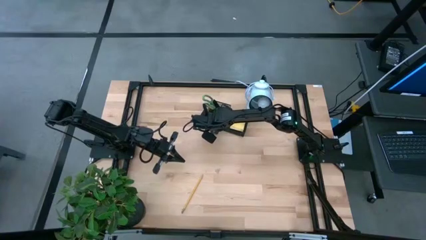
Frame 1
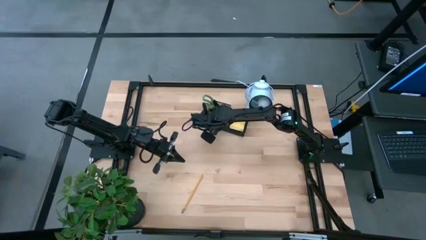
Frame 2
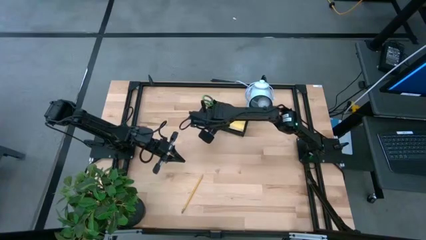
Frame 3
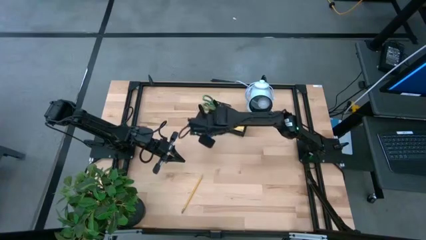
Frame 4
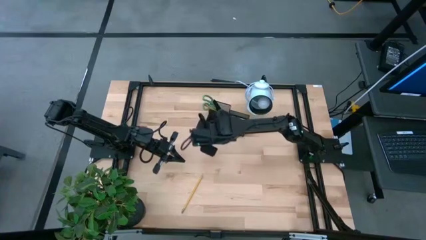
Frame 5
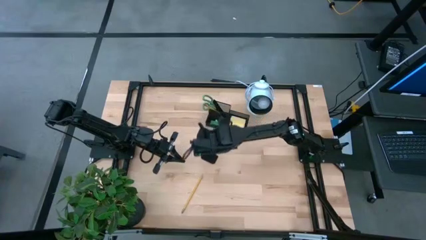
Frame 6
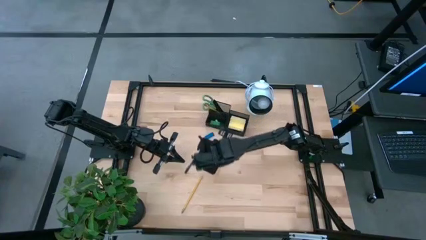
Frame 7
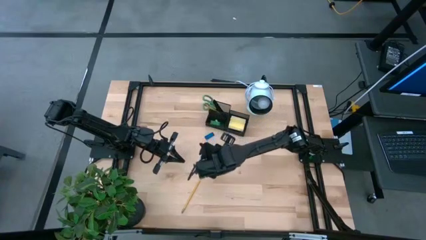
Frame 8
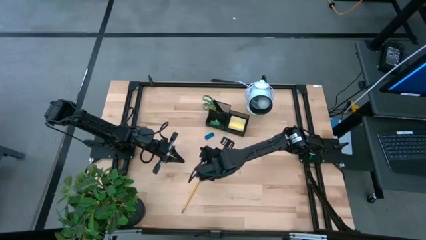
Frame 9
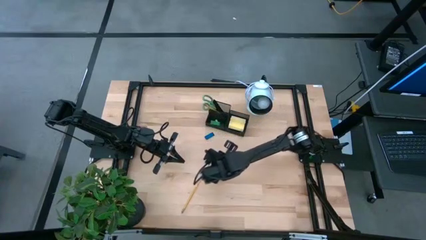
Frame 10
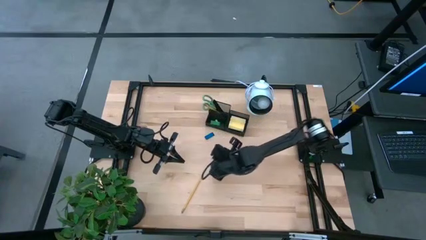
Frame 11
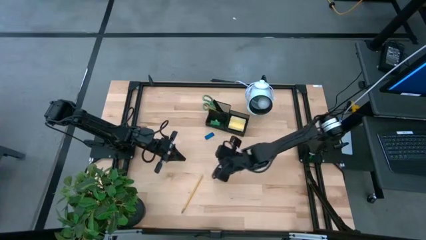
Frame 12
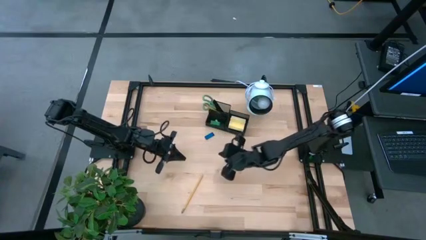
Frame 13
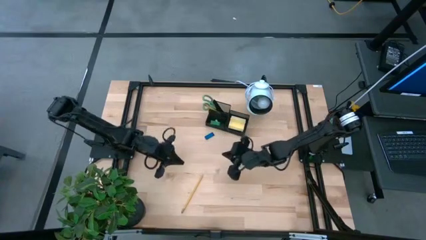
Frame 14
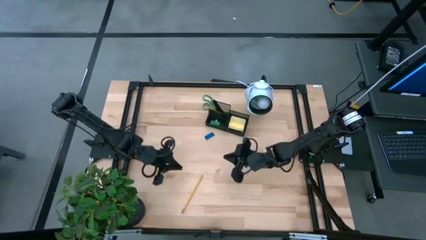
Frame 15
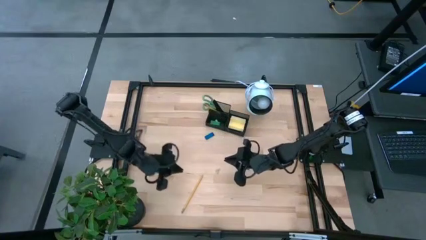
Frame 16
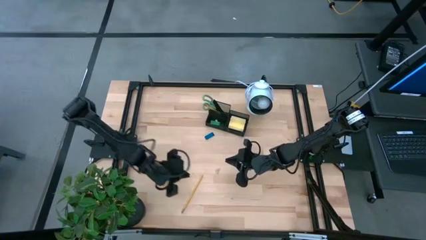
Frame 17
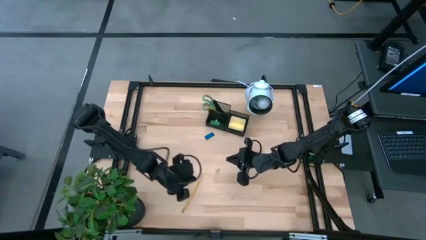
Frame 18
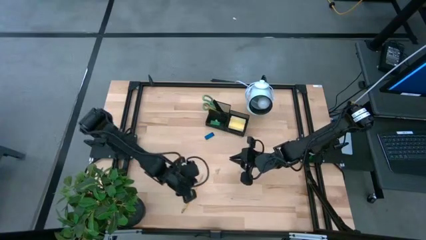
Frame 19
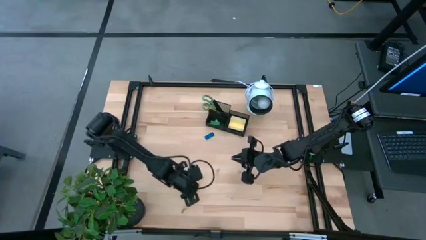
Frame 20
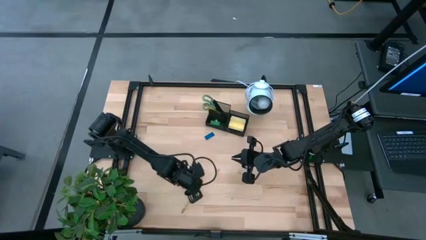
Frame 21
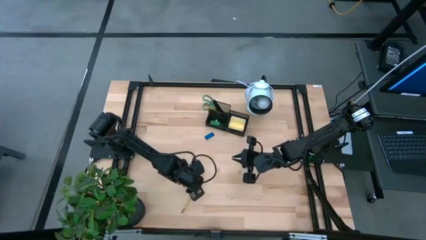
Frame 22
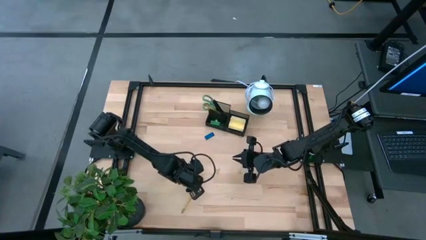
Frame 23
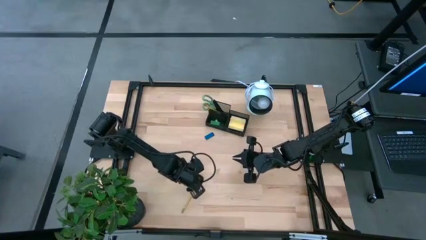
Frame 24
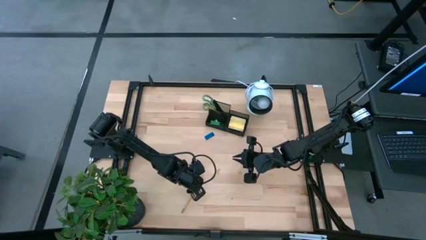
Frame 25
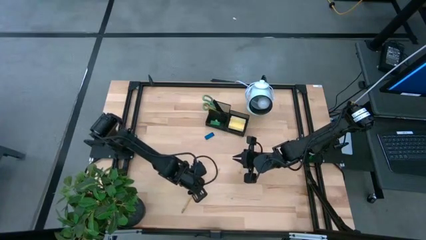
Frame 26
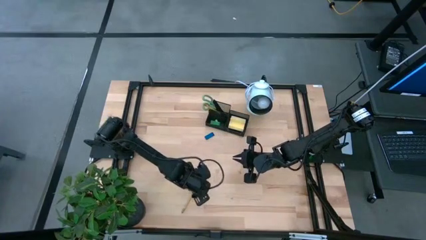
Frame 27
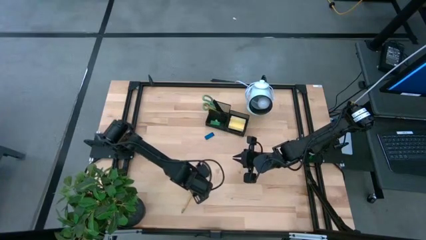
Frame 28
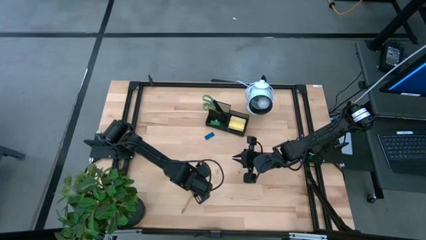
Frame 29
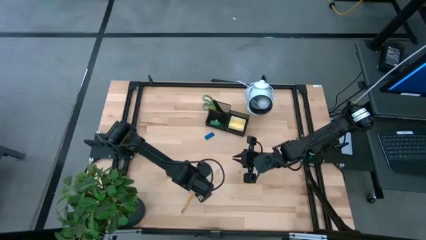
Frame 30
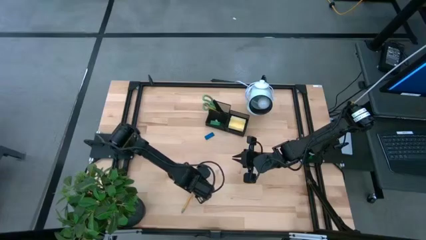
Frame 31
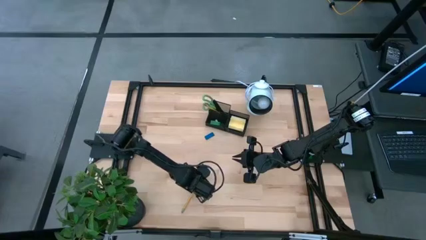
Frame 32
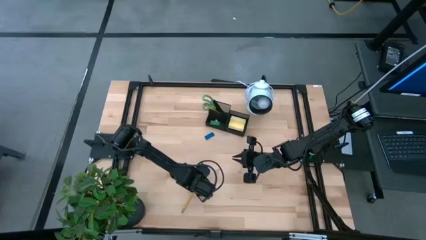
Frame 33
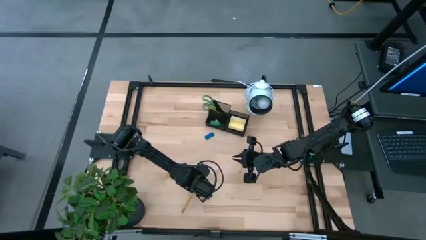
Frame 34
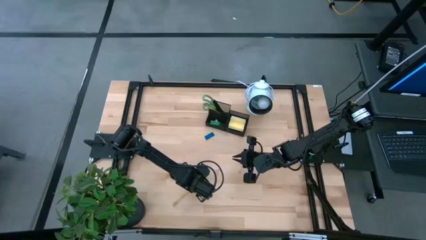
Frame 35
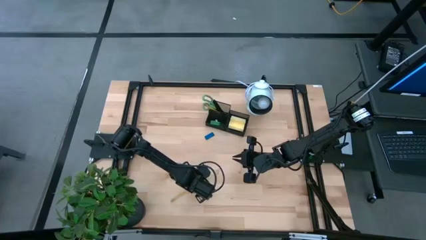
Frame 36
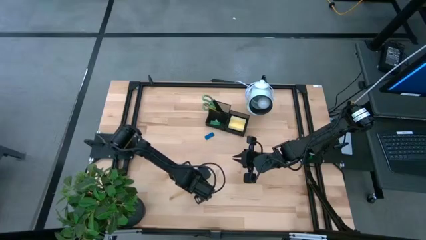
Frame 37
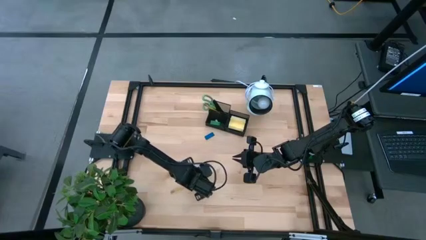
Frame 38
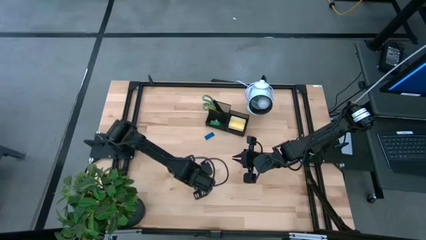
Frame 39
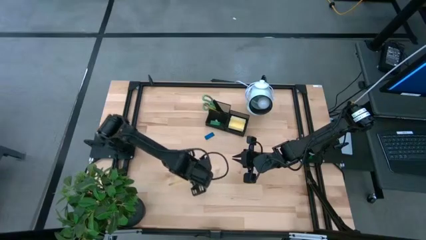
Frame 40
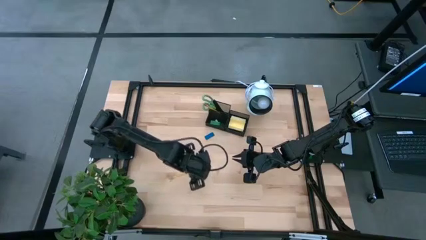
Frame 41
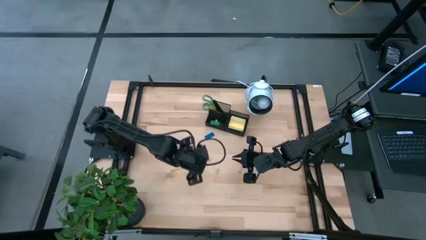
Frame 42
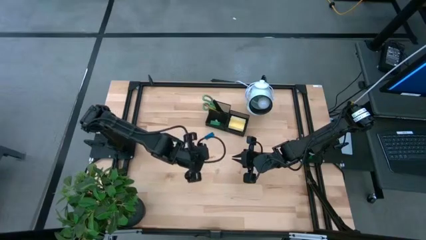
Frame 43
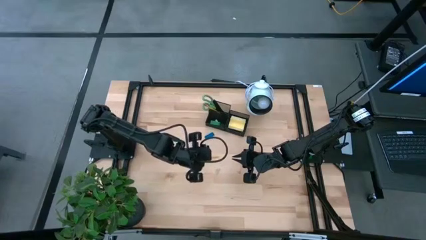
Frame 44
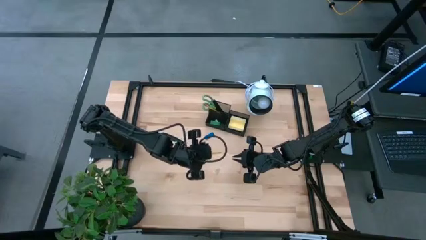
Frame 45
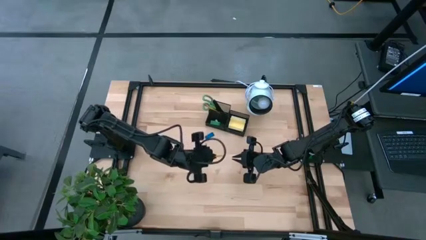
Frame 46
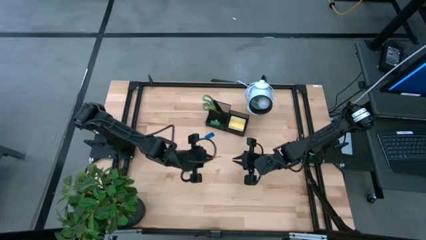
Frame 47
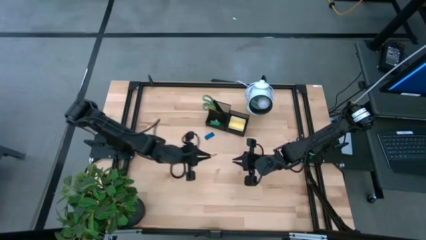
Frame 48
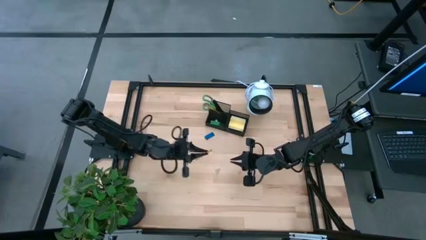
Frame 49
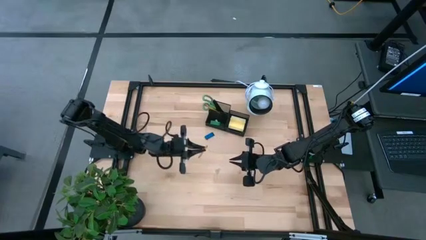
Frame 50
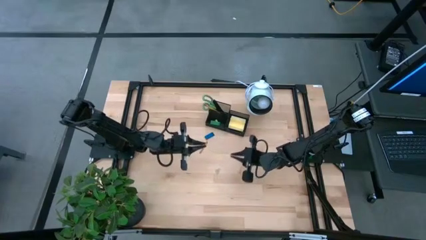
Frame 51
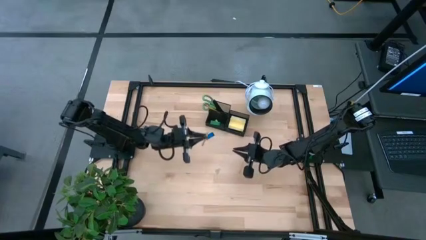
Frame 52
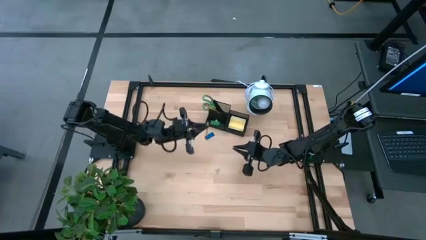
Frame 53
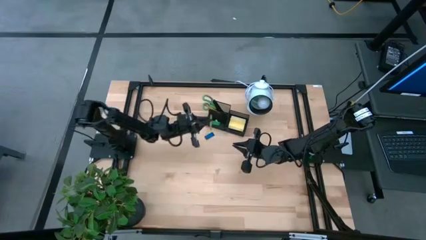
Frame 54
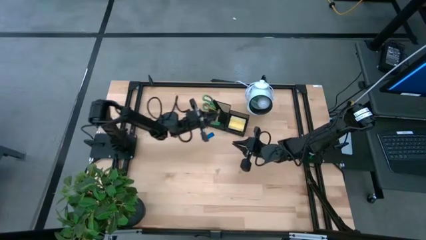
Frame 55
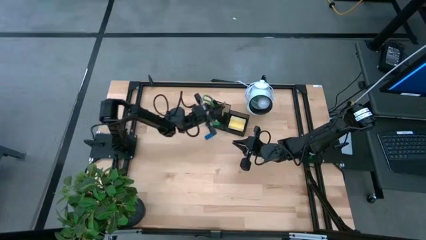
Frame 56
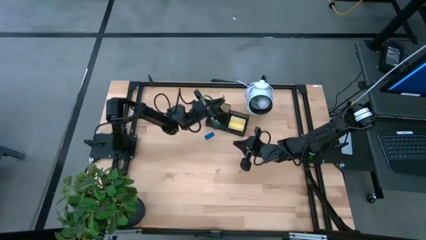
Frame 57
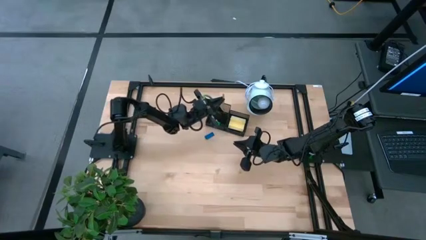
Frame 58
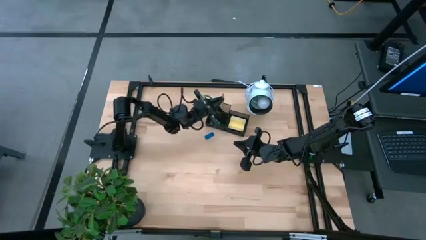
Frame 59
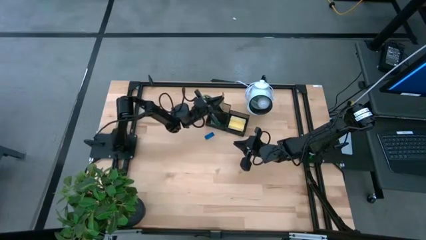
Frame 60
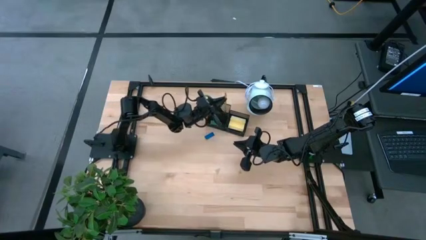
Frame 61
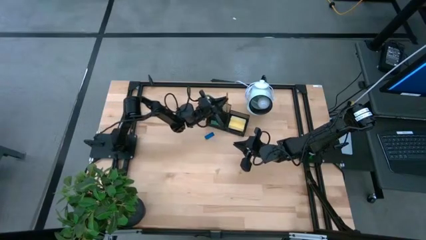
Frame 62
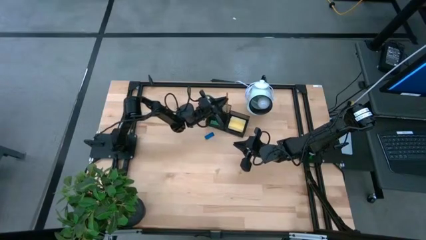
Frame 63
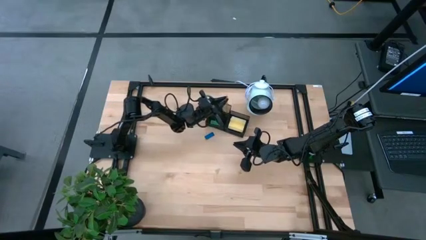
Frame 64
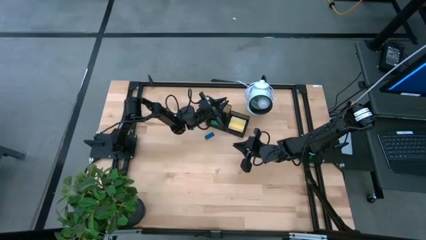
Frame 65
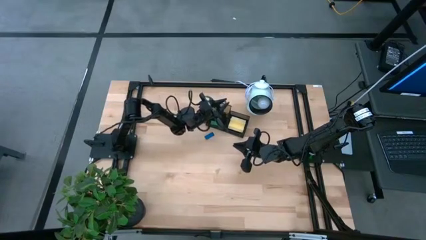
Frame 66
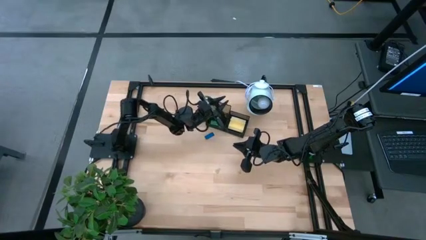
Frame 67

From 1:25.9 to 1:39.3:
Task: Pick and place office supplies into organizer
Put the yellow pencil into the black desk organizer

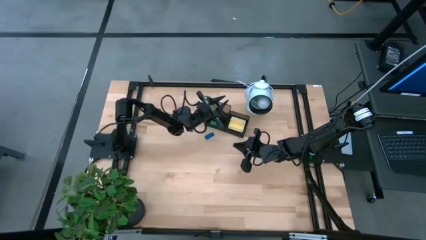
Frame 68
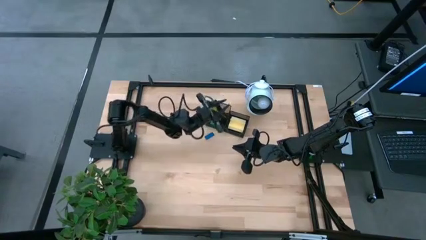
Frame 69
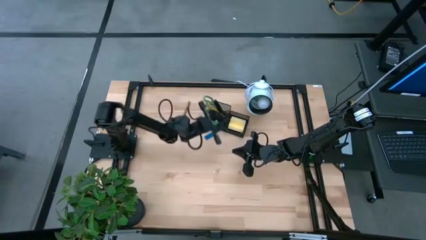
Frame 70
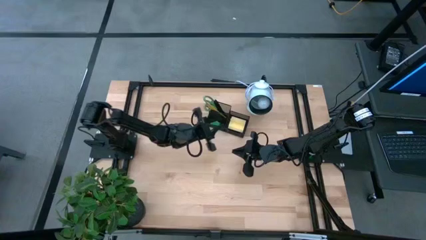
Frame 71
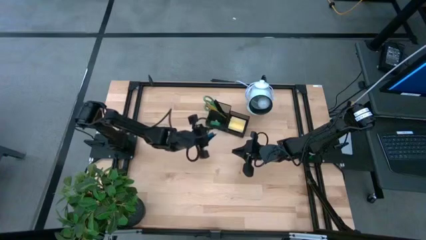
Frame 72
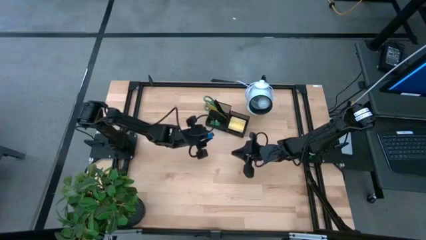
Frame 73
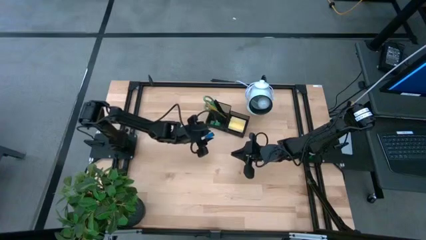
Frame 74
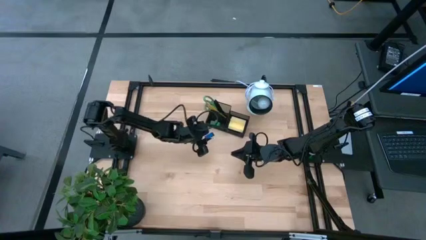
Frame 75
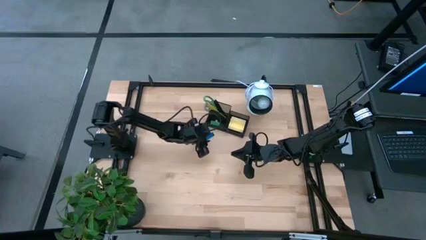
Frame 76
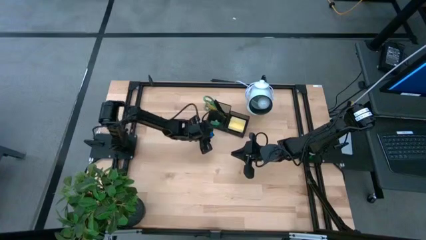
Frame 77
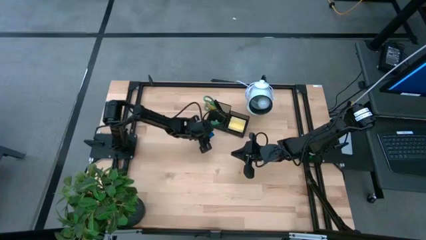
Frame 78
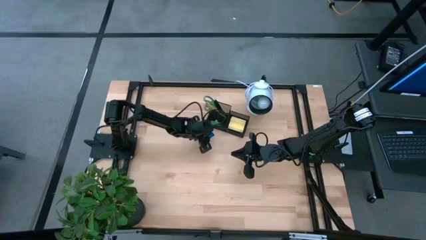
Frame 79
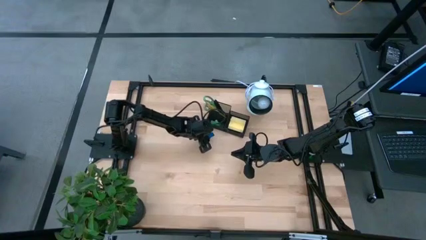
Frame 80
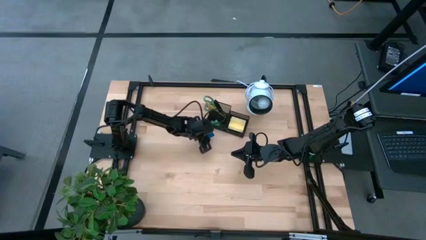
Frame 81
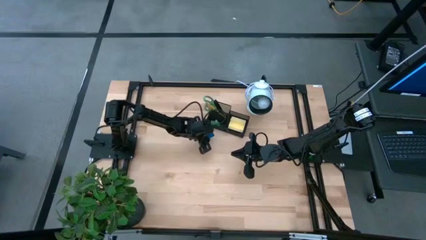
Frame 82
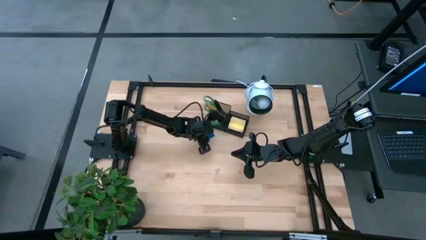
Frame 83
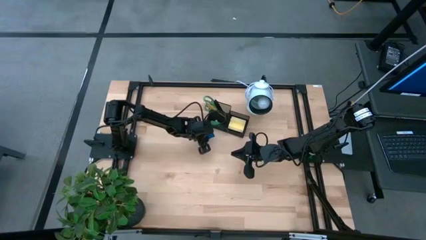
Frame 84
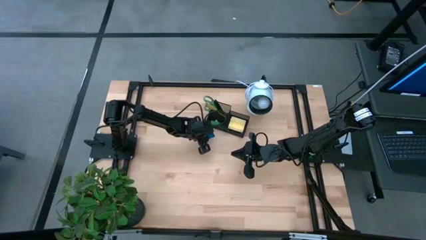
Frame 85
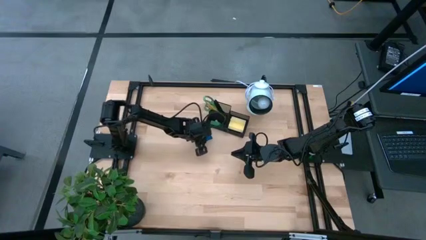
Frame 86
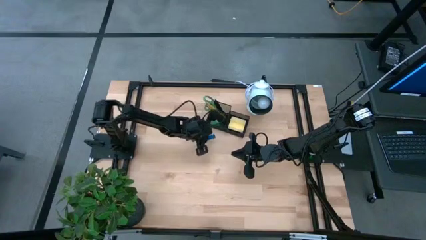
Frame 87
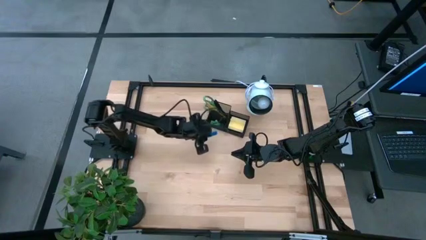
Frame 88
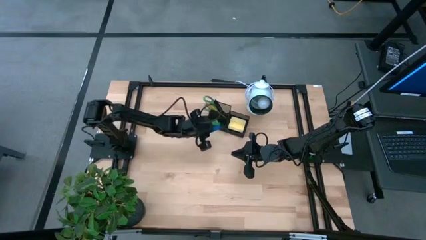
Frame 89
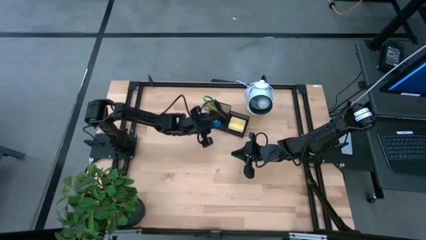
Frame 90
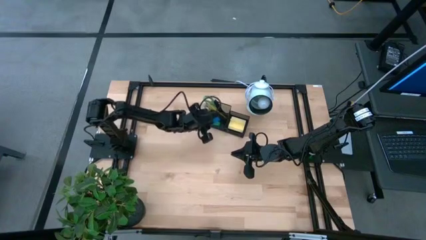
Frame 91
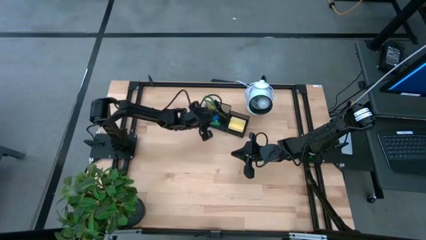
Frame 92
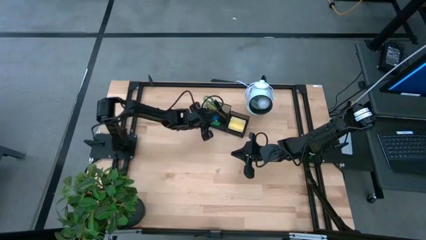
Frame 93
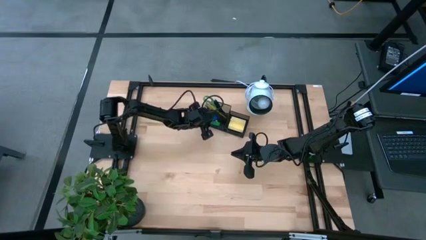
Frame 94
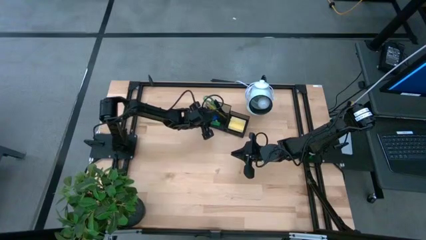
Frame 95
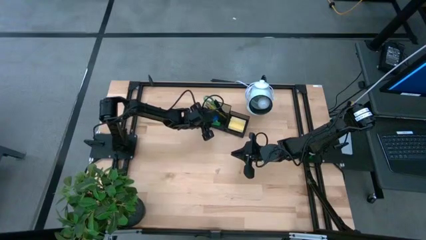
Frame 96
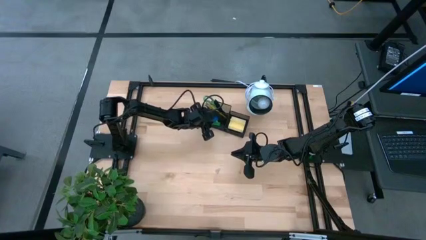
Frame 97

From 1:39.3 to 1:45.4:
Put the blue eraser into the black desk organizer
